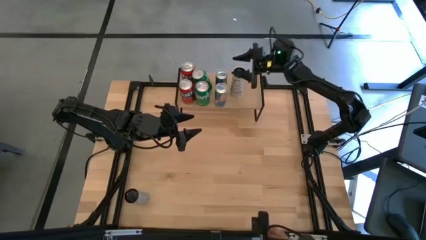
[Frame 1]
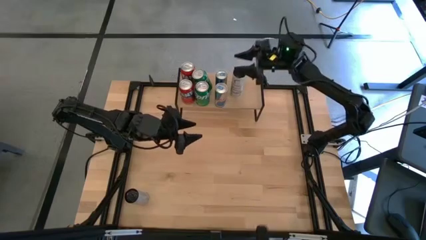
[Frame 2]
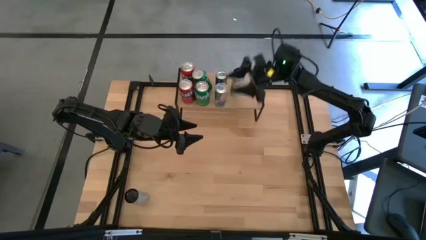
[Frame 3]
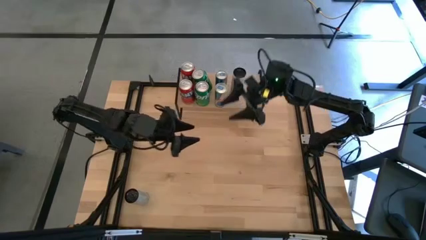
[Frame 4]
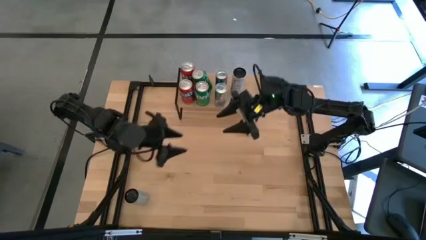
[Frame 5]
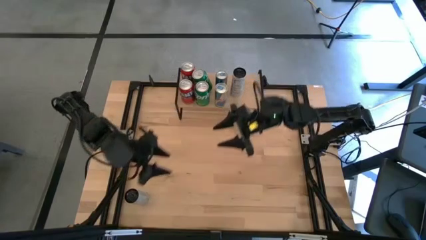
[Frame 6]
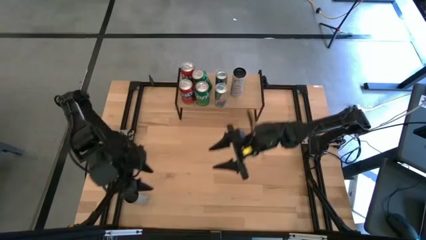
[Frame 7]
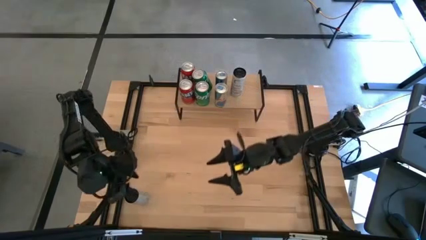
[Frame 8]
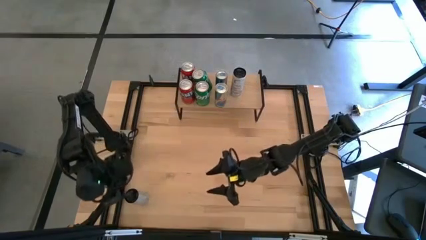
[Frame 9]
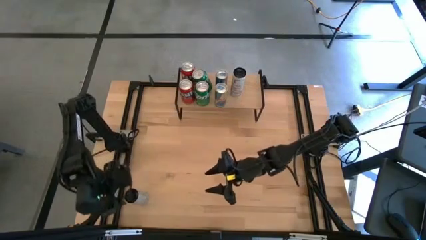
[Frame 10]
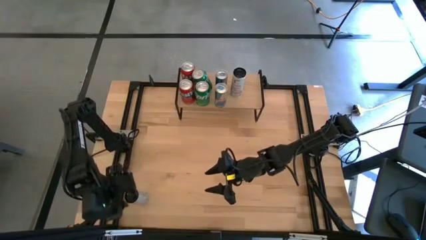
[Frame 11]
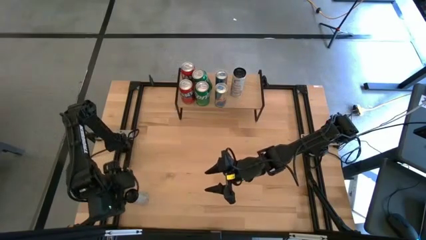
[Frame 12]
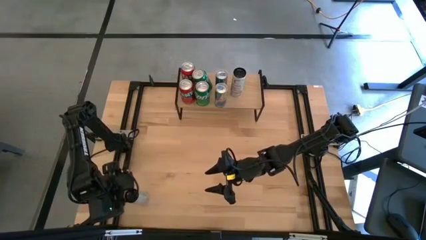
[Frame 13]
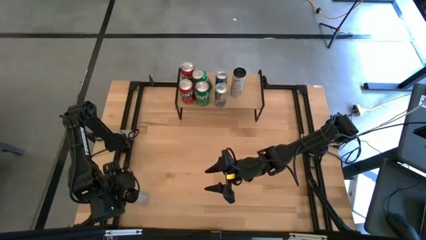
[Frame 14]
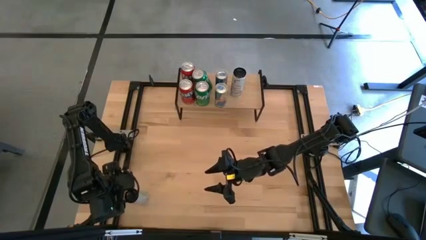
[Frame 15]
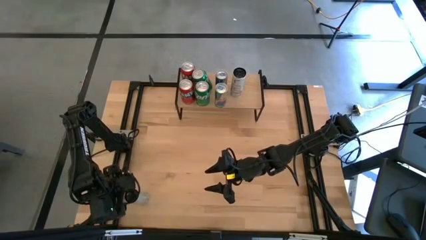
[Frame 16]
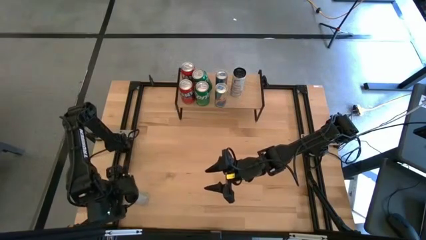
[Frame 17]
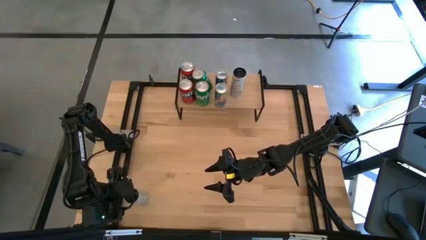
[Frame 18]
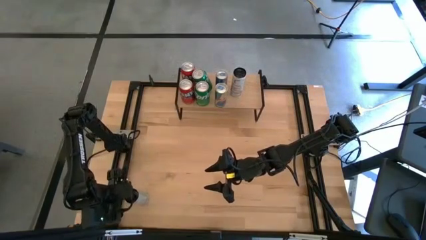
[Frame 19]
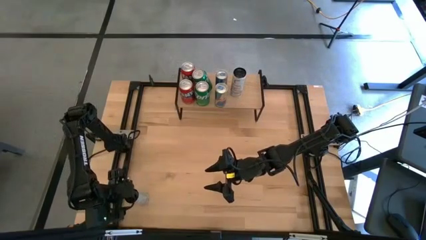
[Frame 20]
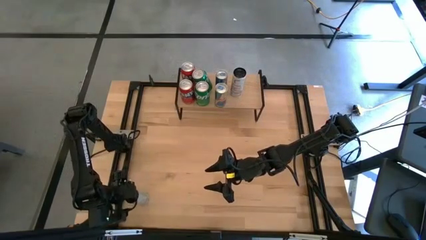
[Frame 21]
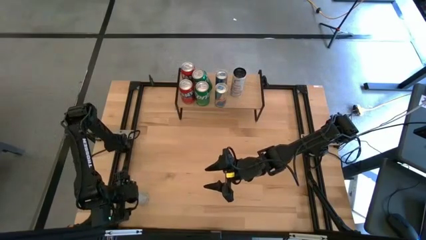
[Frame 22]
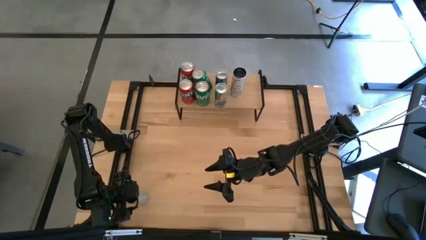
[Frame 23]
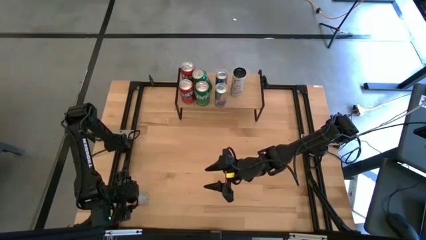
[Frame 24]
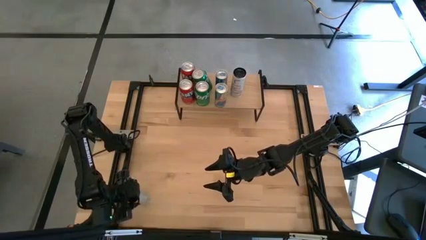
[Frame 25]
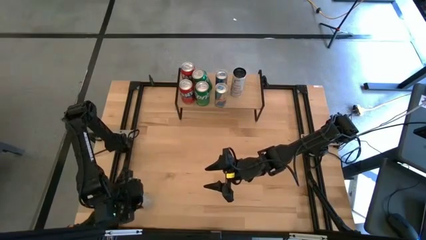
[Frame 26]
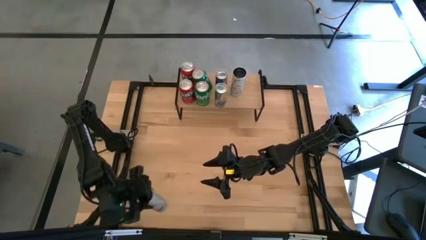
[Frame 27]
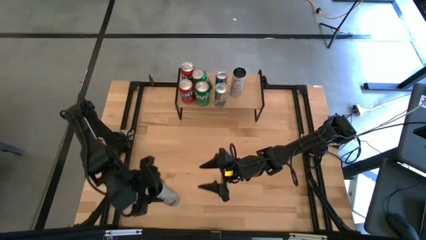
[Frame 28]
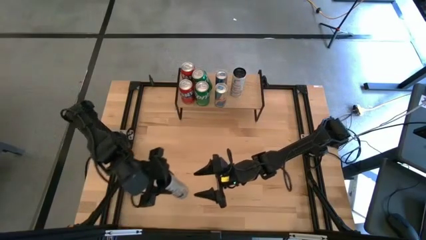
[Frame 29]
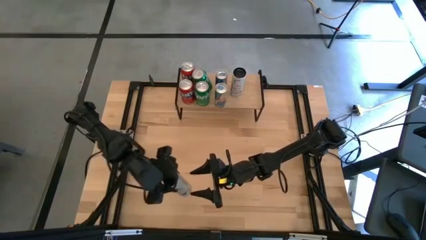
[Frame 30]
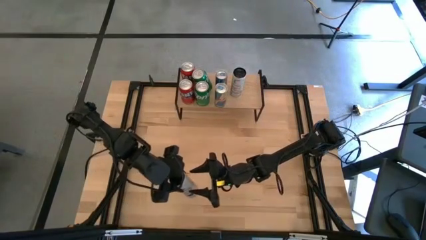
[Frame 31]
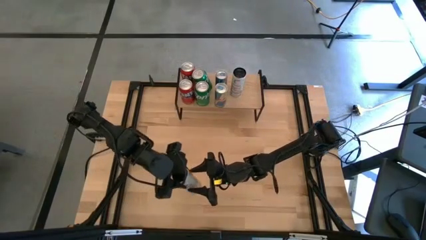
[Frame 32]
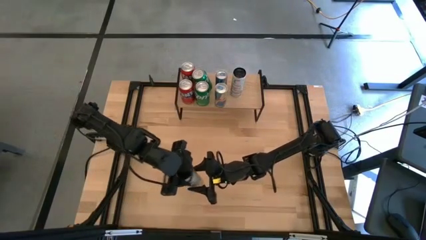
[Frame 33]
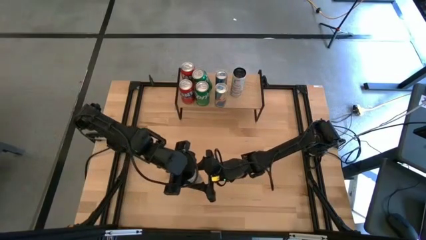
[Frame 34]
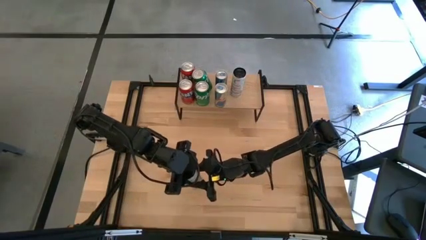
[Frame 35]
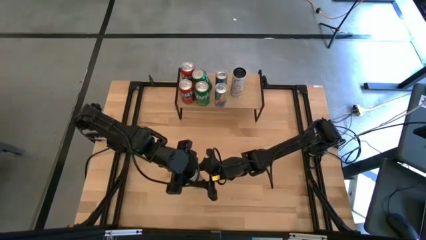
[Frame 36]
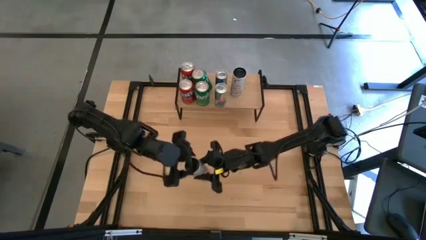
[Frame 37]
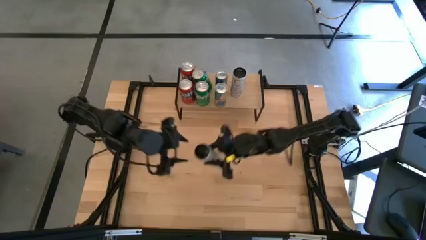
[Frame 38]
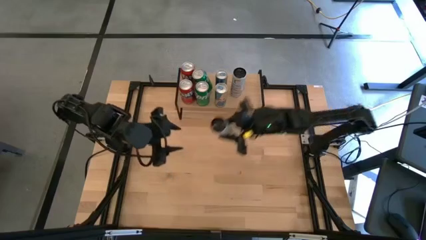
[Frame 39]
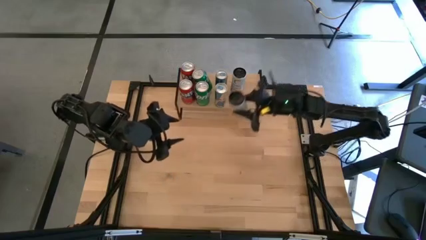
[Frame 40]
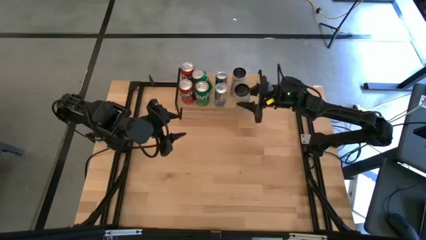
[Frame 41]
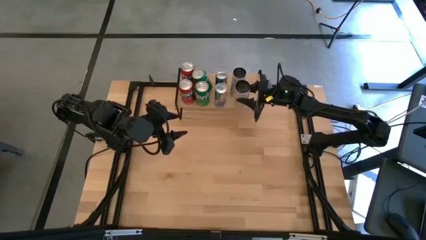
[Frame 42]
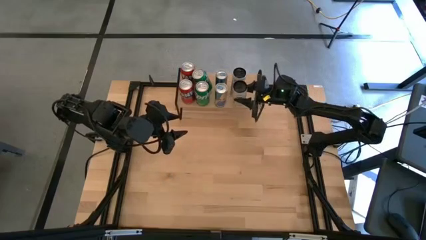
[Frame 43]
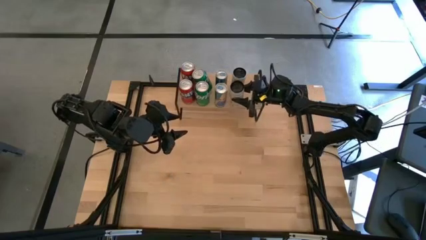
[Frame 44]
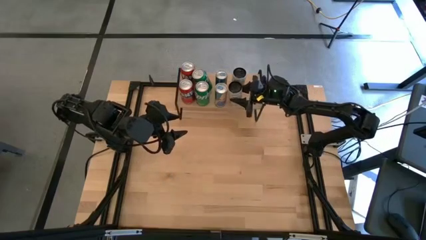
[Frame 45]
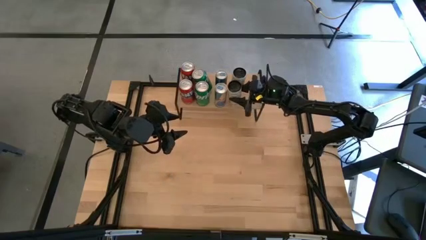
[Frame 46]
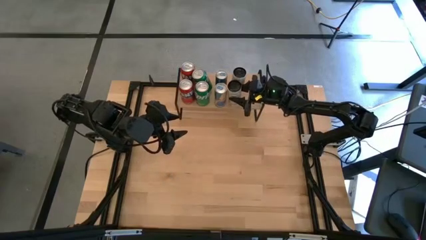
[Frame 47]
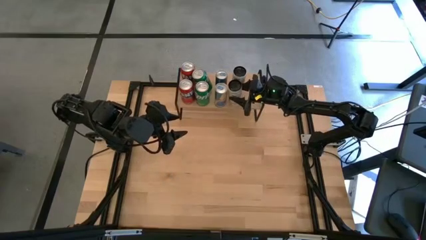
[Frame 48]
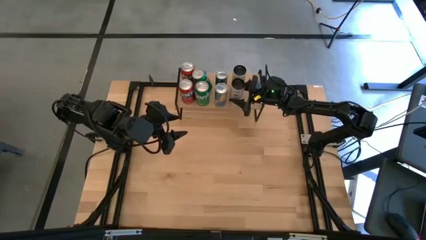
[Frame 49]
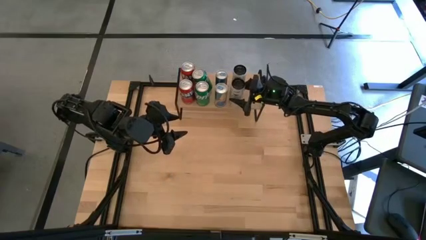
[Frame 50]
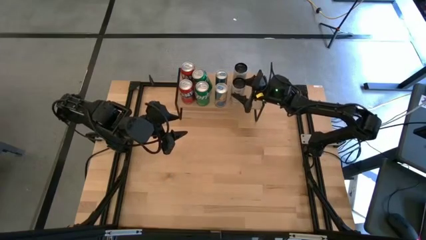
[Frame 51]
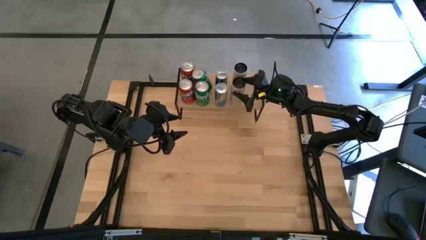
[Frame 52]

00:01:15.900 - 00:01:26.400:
Task: Place canned beverage on shelf
Put the white-yellow soda can on the shelf aligned with the other white-yellow soda can

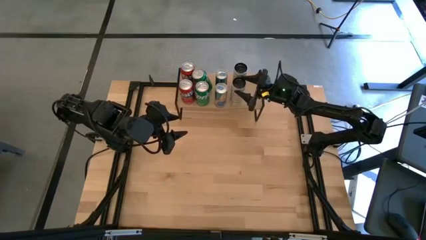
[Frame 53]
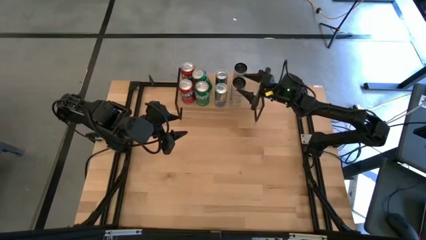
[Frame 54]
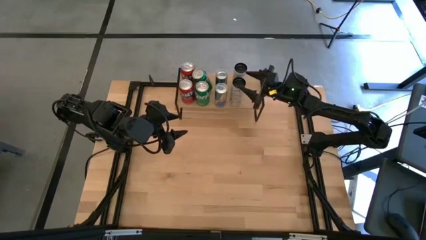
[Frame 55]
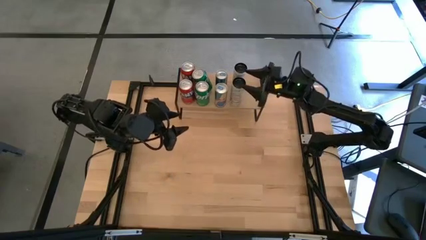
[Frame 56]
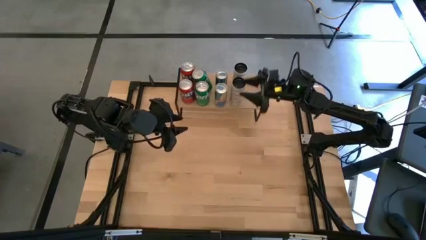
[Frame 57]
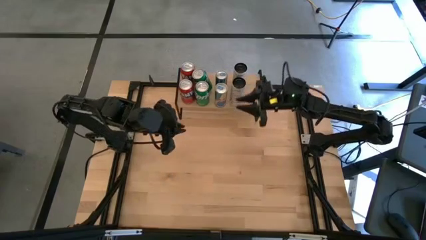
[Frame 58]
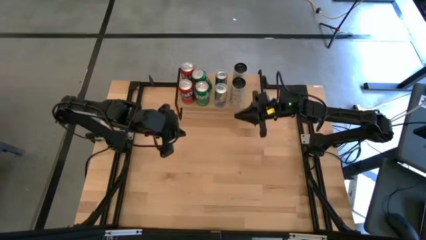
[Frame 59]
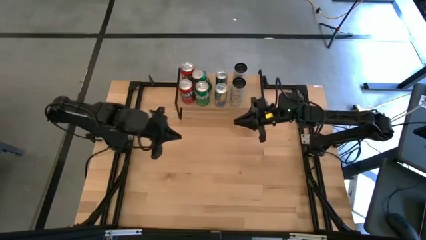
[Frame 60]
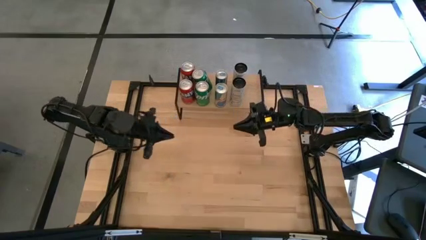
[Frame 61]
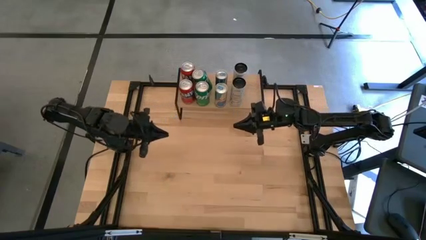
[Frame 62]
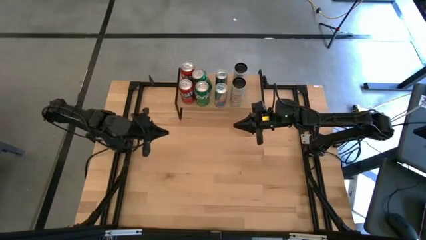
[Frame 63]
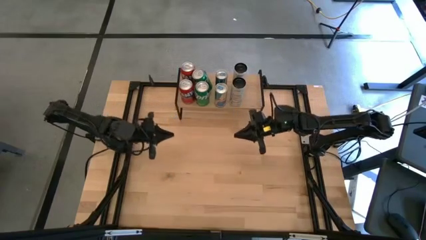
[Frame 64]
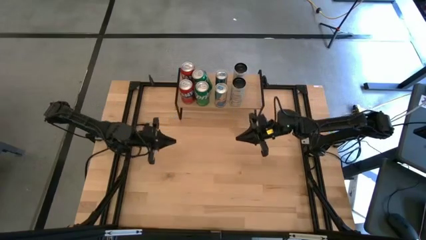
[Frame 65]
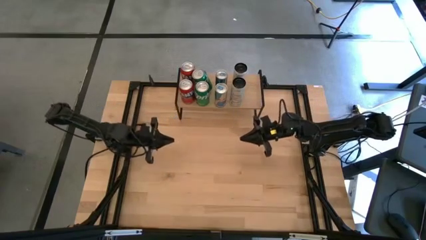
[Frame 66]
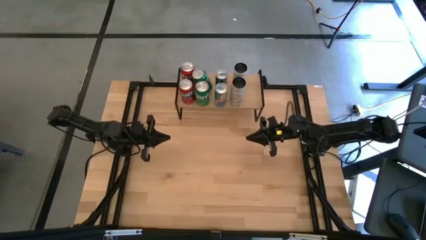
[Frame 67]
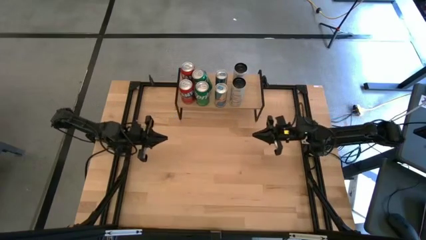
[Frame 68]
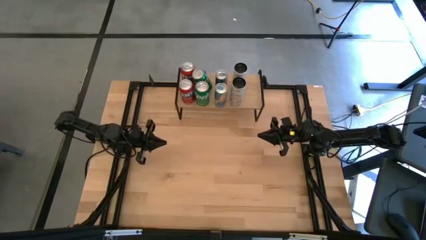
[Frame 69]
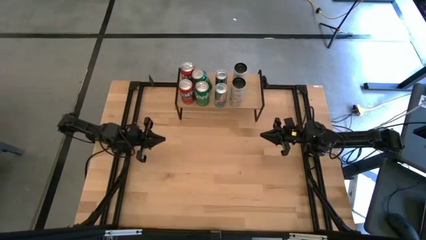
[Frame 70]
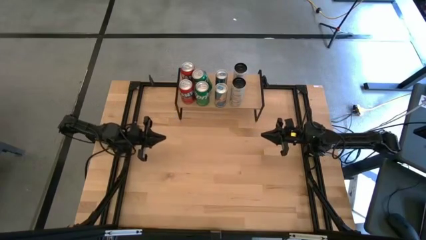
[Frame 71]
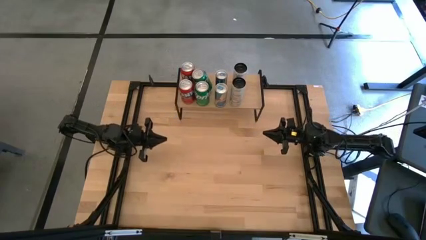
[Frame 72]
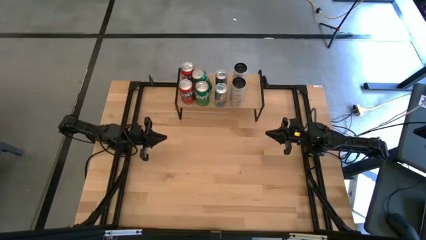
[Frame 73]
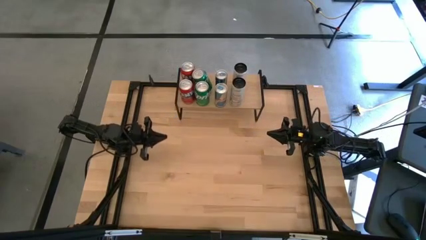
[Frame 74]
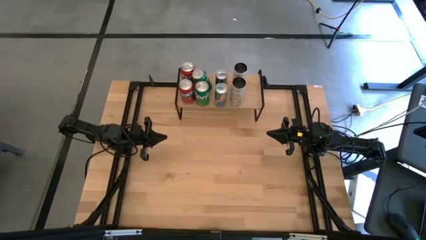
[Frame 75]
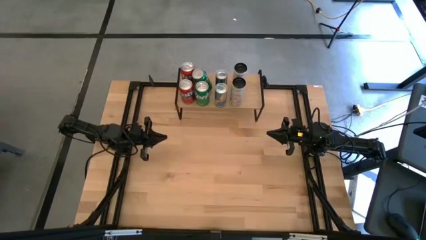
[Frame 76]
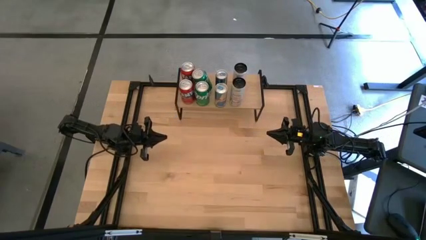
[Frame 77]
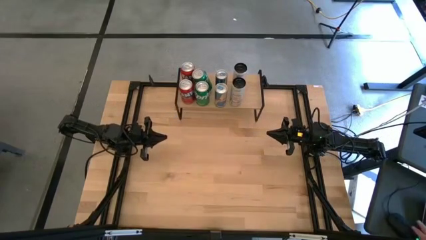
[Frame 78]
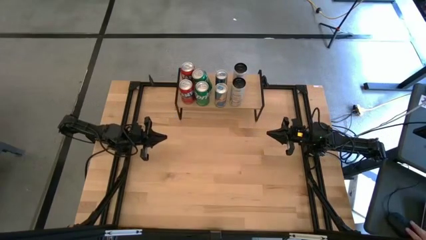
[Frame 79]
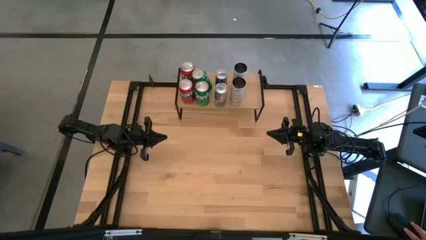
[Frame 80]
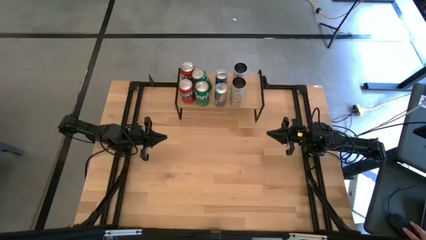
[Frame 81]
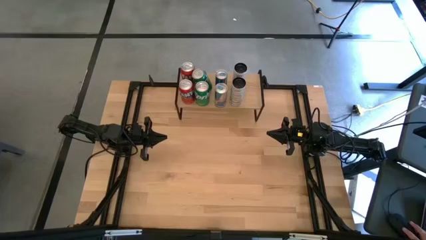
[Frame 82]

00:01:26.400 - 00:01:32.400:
Return to Home Position

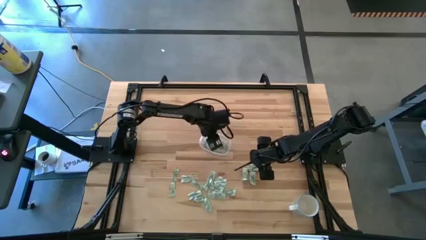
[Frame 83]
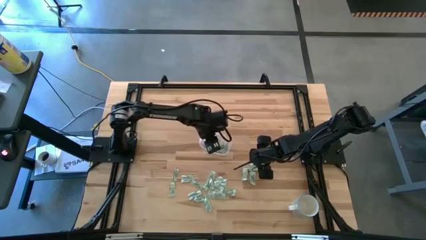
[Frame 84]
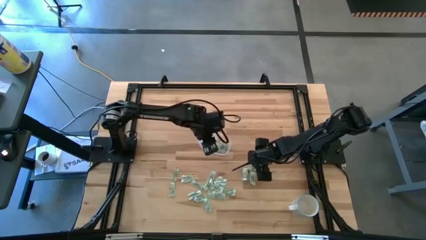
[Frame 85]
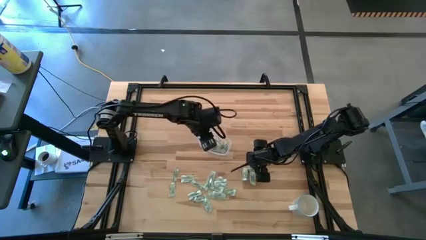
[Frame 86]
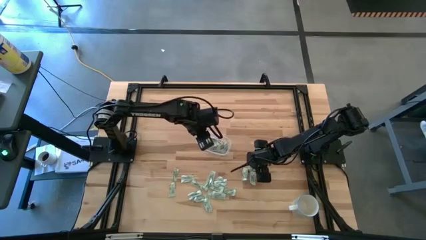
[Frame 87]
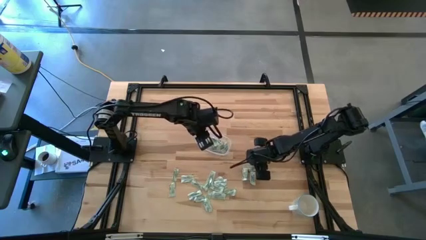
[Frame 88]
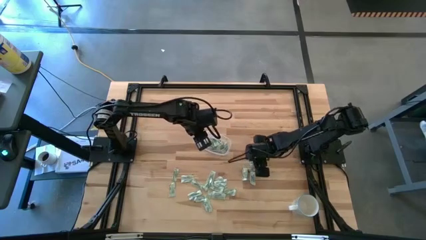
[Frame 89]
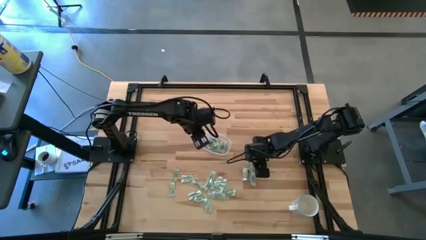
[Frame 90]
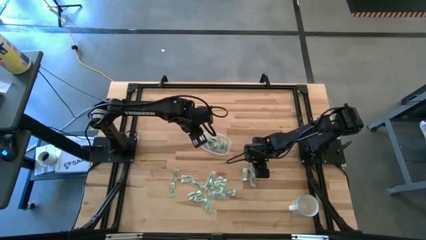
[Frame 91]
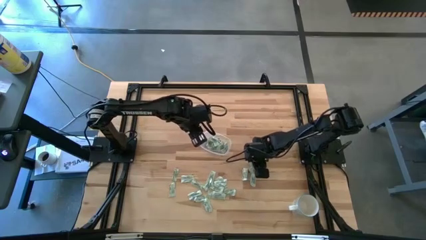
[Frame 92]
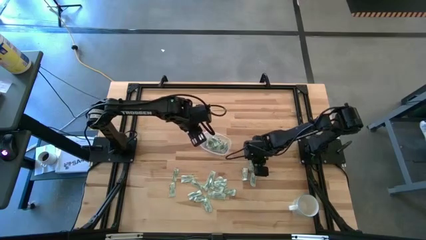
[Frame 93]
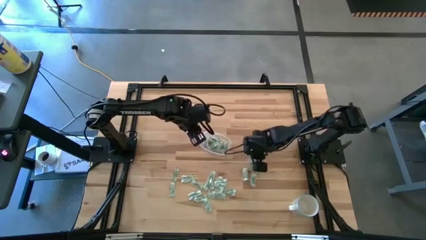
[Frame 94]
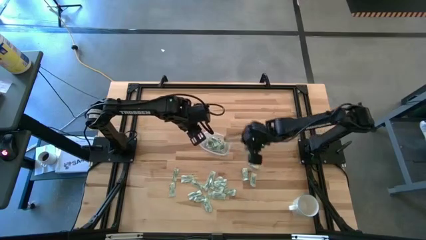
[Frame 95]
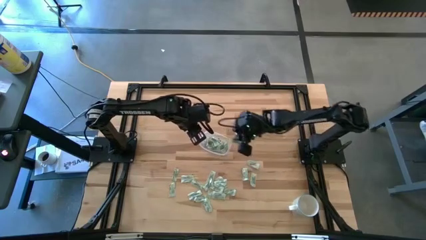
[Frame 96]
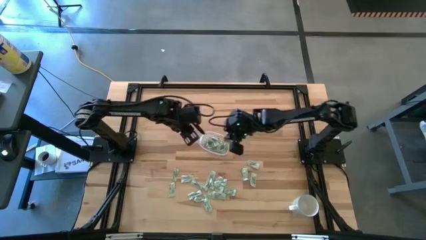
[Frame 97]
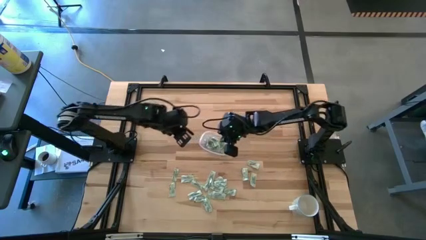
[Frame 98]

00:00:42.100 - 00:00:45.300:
Task: Pick and place Stevia / Truvia into bins
Put the stevia packet into the transparent container
